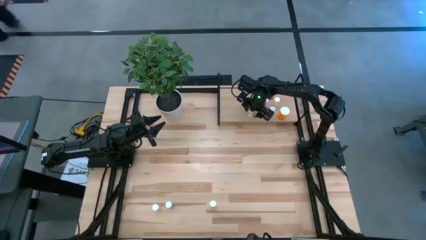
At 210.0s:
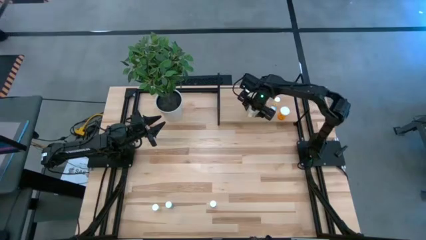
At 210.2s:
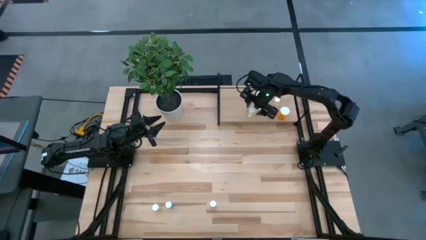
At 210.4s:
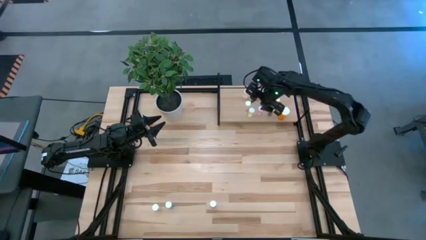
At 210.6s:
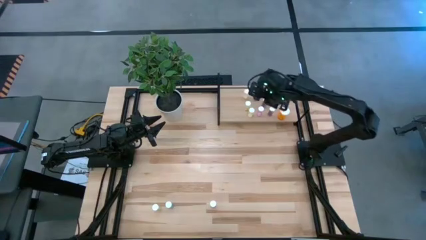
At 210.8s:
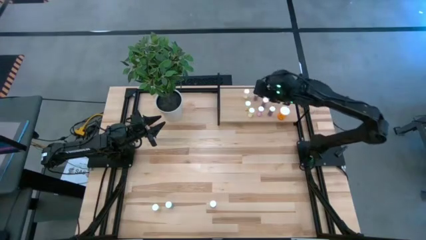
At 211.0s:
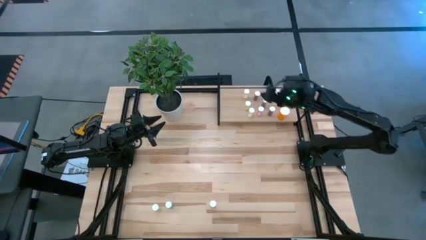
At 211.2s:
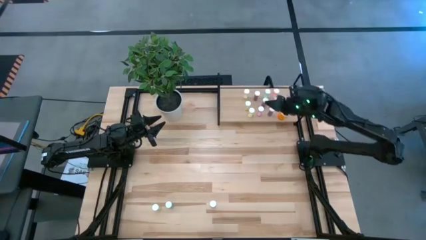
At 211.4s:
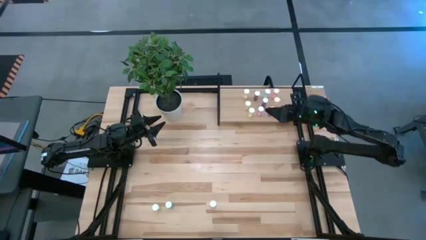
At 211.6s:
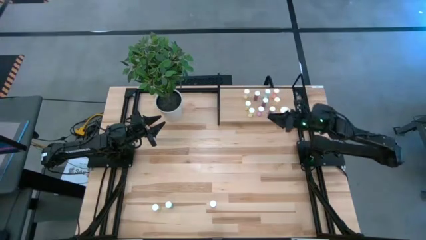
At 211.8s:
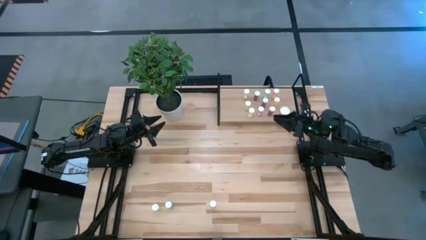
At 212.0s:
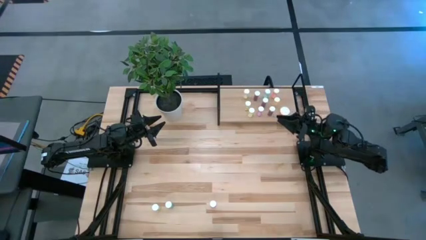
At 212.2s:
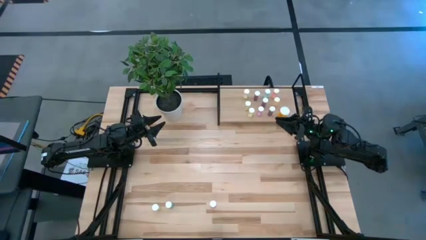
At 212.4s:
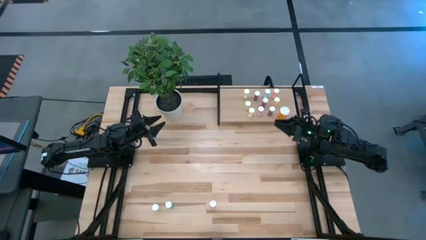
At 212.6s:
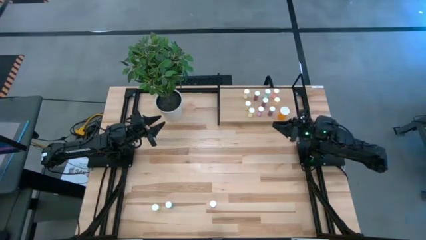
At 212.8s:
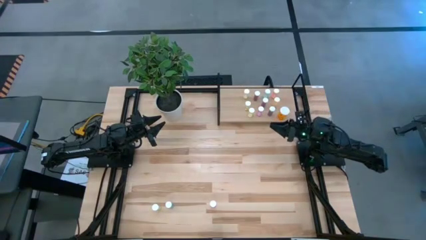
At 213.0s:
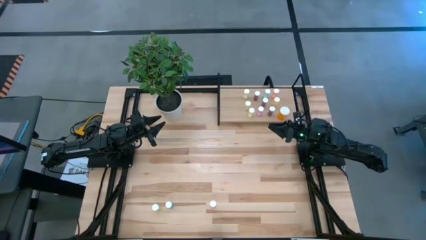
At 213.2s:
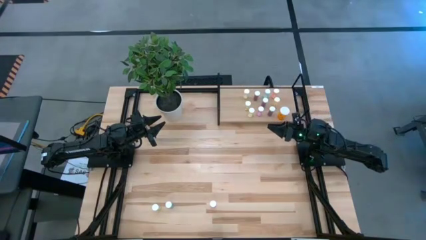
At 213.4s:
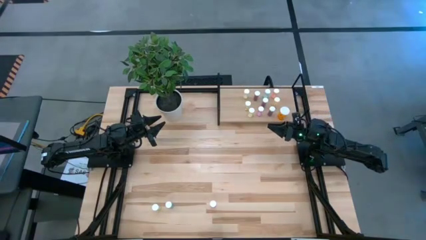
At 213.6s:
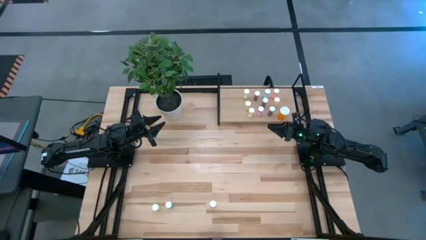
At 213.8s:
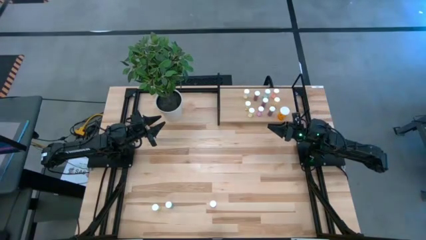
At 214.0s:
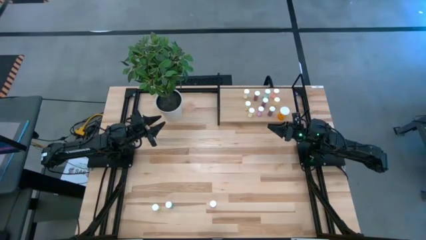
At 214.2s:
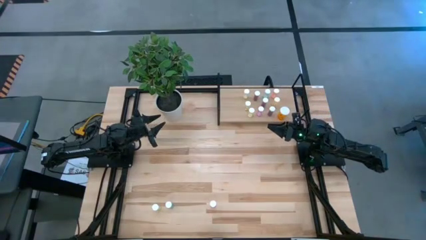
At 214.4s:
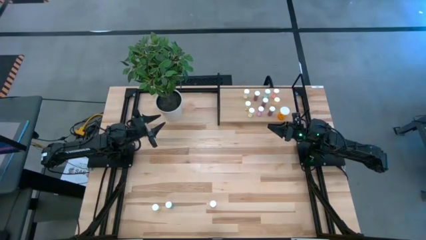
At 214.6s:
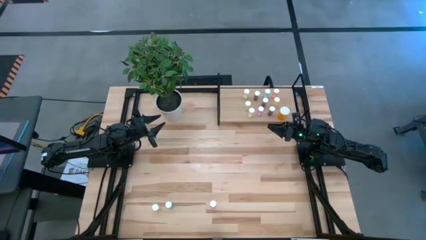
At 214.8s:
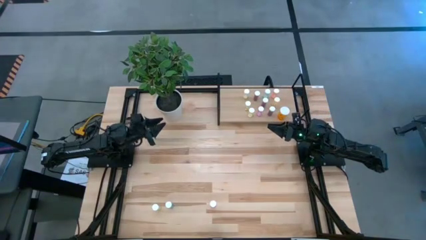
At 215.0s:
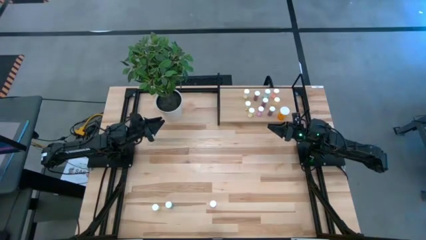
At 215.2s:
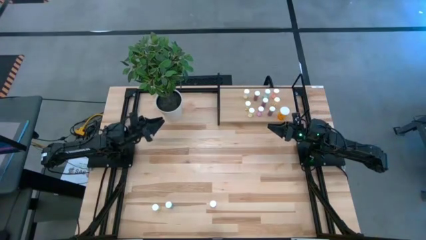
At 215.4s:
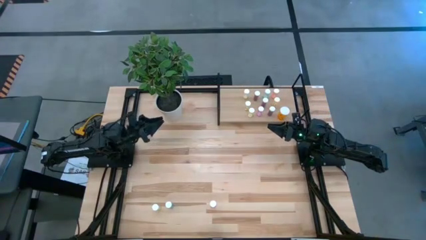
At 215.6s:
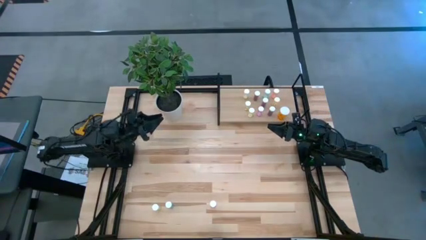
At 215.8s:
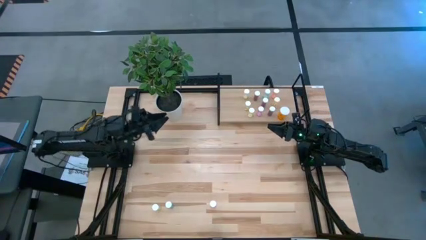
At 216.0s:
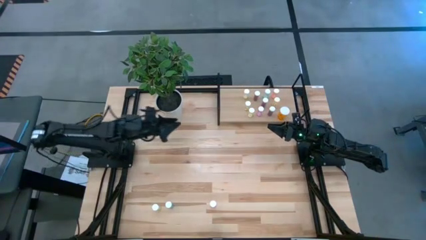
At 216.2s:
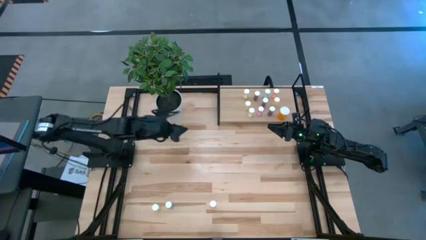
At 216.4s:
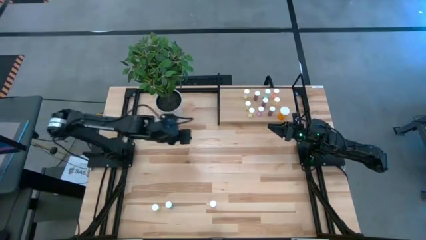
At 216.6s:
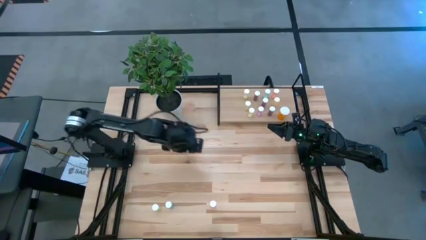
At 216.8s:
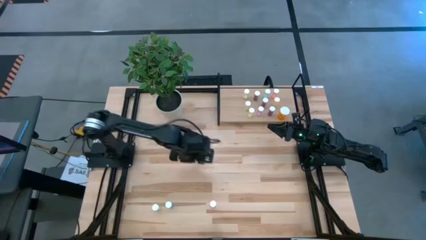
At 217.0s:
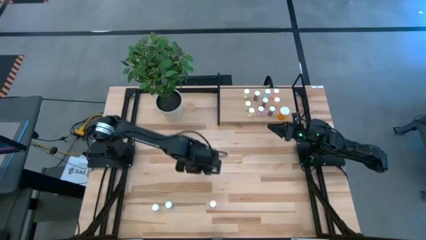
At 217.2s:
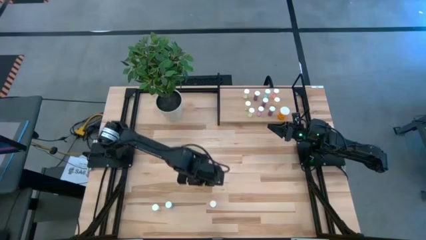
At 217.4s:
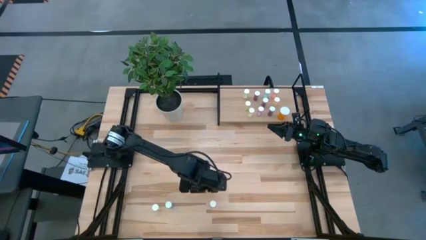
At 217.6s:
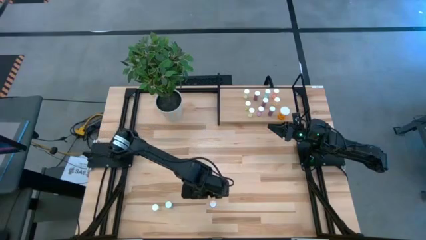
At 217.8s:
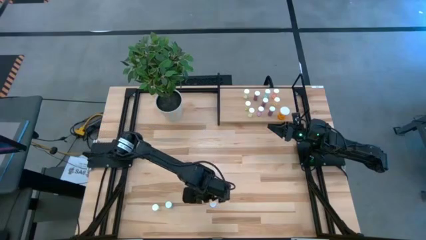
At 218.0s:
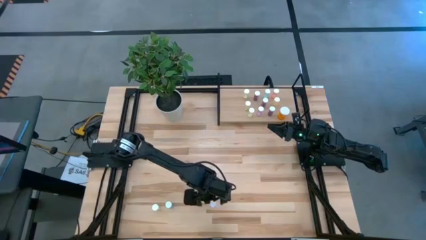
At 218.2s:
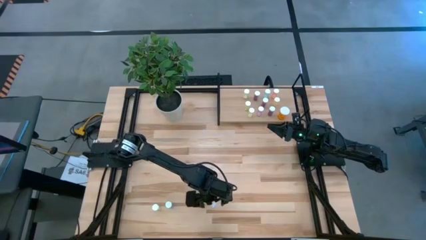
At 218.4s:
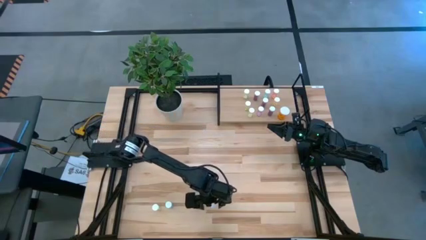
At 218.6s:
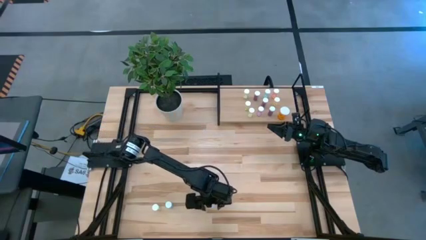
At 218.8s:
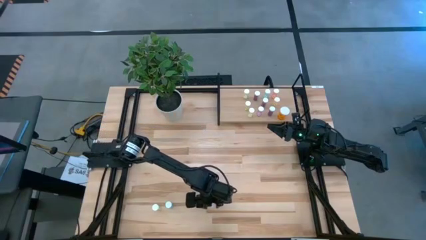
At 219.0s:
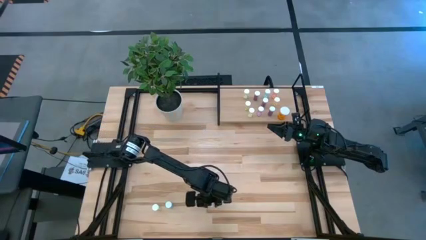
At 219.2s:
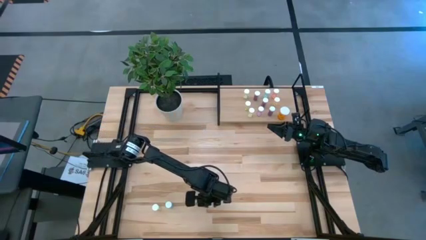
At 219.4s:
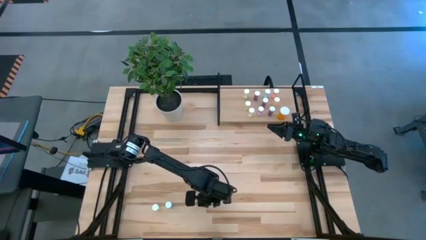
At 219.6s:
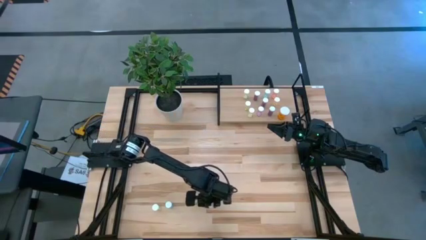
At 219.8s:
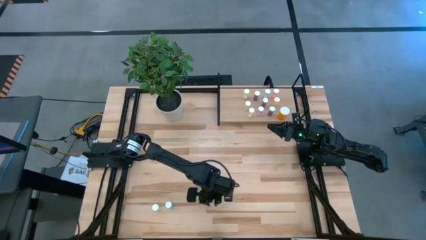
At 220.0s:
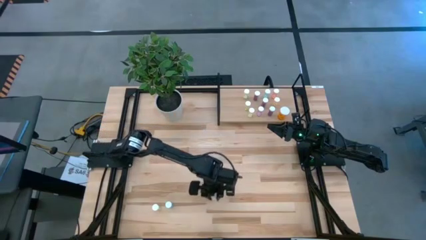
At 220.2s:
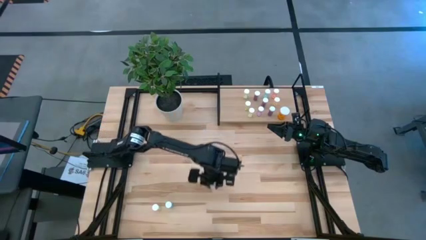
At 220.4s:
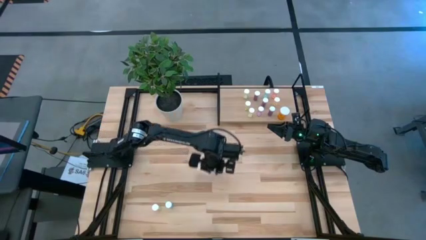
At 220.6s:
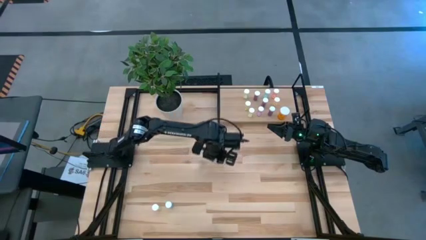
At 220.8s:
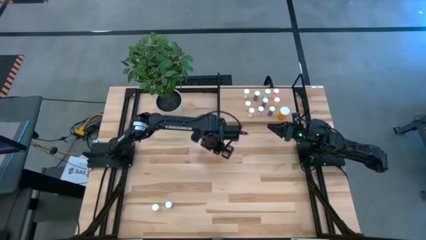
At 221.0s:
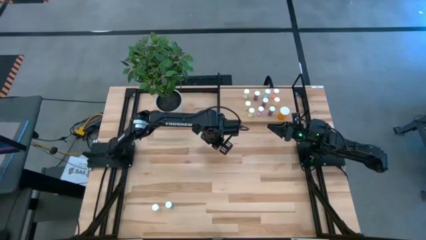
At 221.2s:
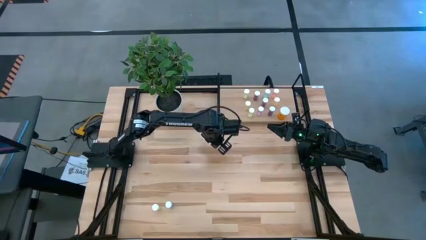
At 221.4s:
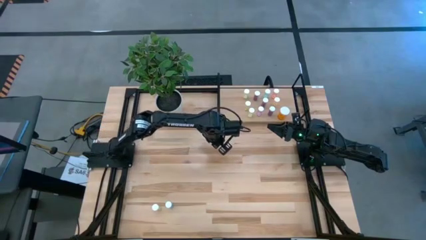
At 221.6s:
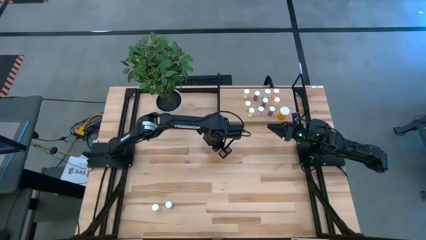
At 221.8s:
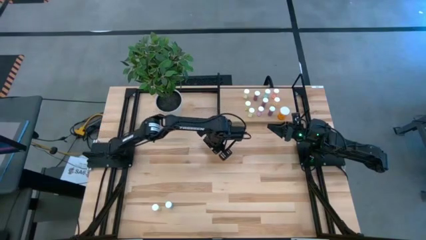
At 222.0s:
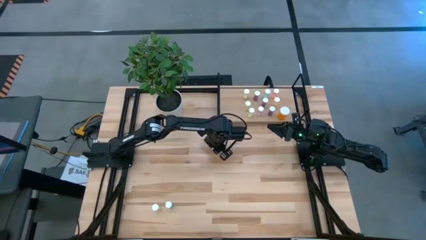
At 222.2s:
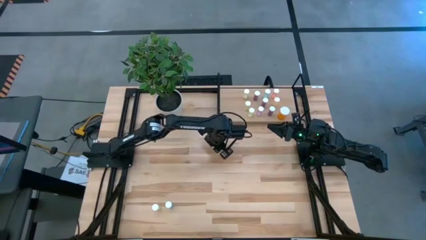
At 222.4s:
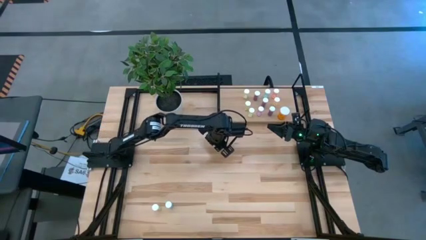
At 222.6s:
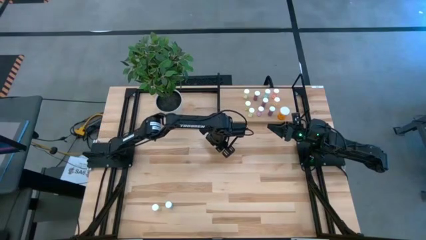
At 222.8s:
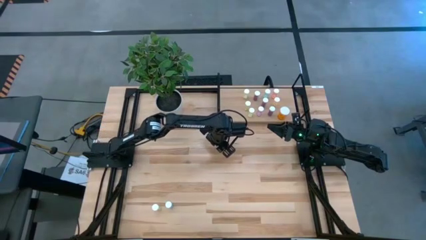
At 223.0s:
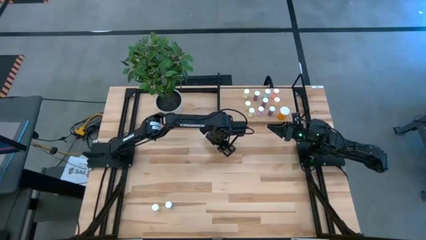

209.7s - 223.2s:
Task: Pick and place medicine bottles onto shelf by color
Move the pink pill bottle to the center of the table

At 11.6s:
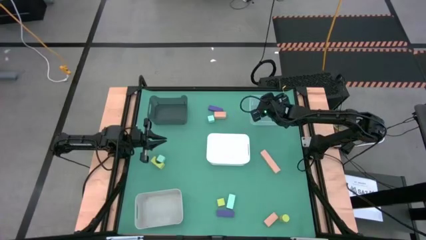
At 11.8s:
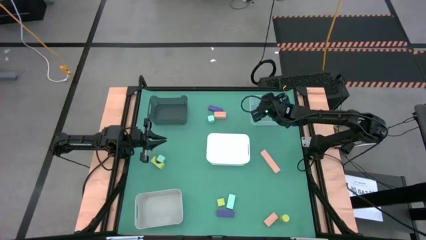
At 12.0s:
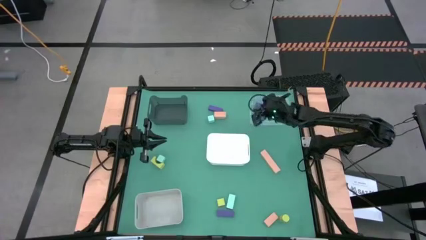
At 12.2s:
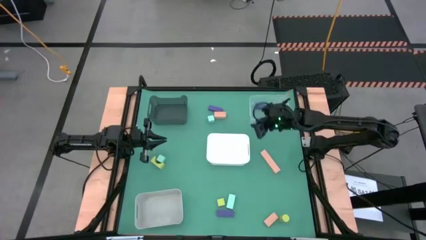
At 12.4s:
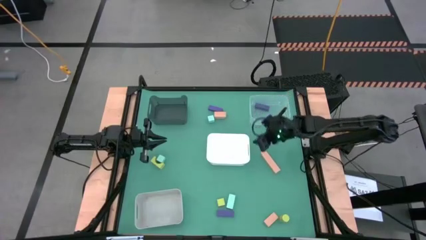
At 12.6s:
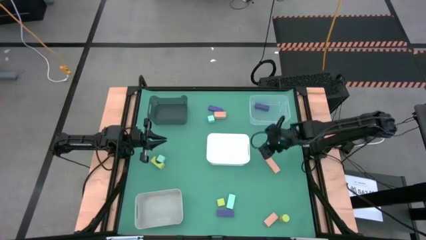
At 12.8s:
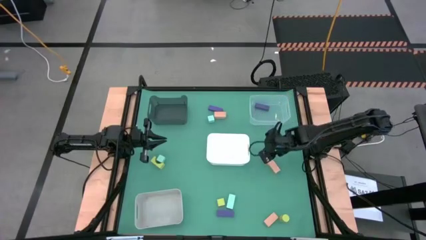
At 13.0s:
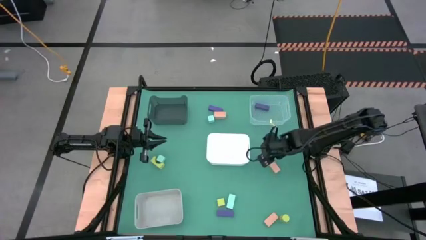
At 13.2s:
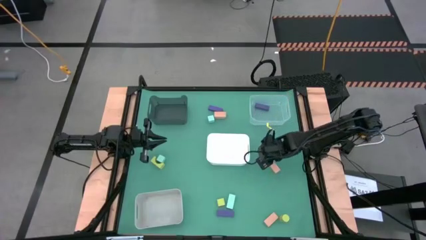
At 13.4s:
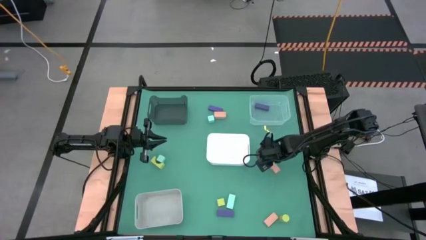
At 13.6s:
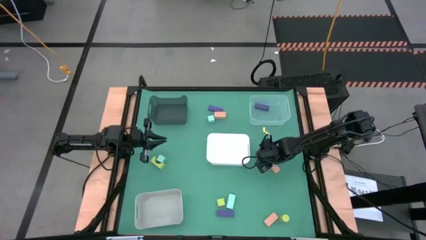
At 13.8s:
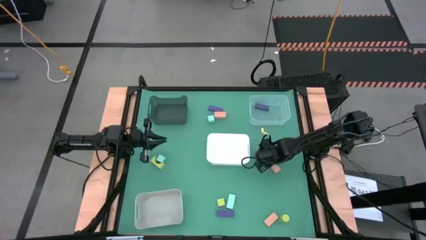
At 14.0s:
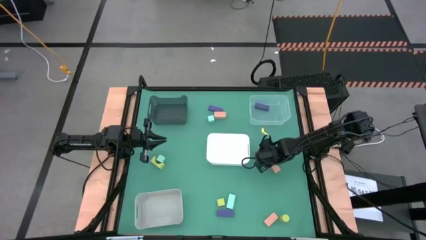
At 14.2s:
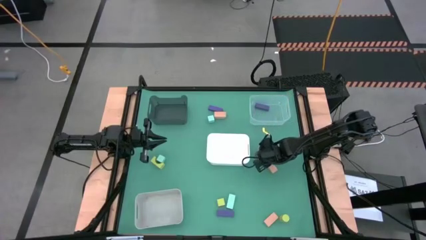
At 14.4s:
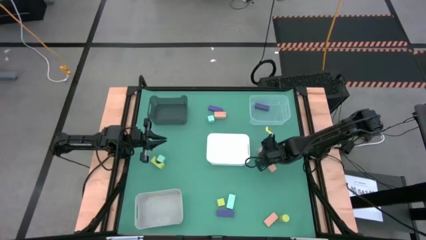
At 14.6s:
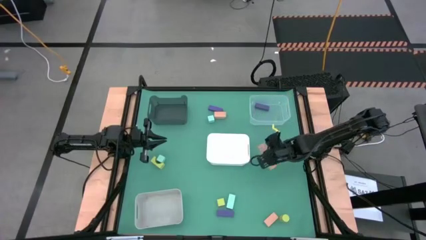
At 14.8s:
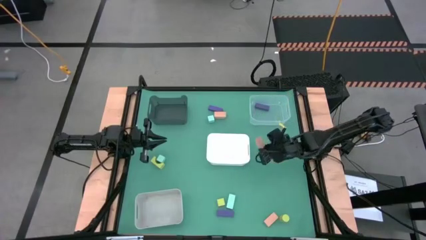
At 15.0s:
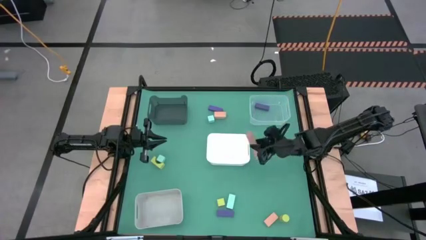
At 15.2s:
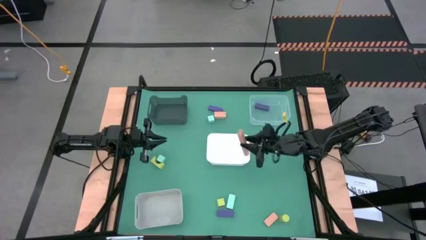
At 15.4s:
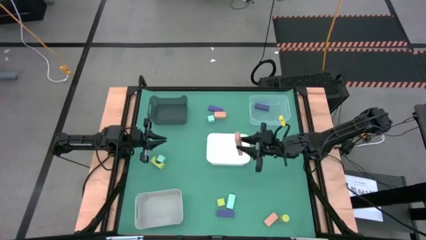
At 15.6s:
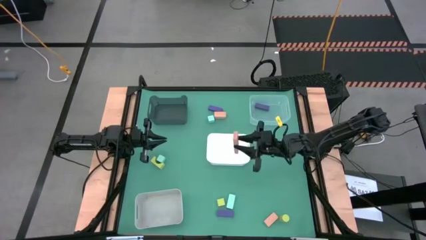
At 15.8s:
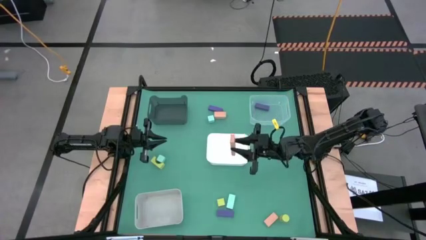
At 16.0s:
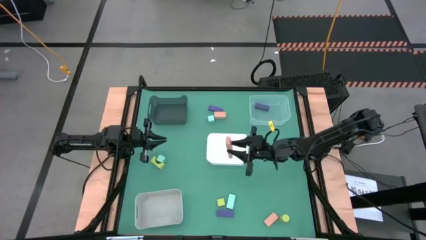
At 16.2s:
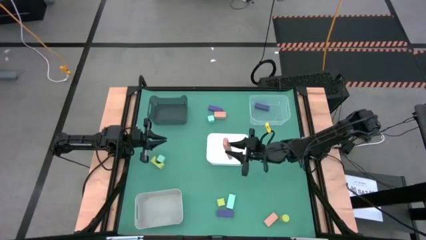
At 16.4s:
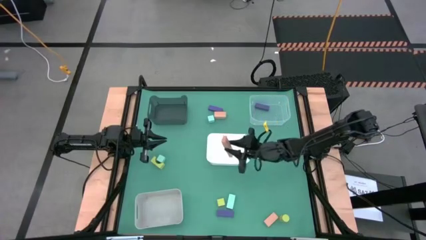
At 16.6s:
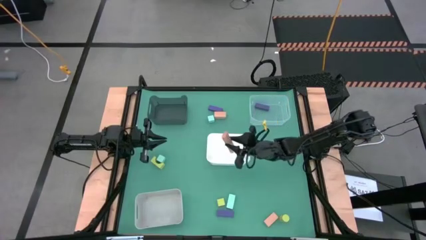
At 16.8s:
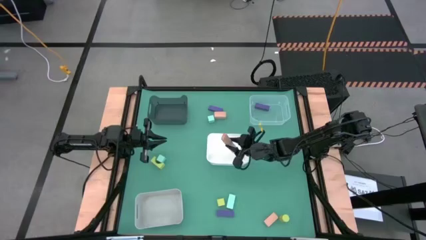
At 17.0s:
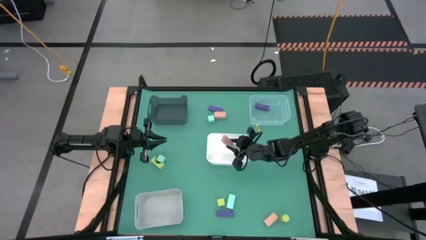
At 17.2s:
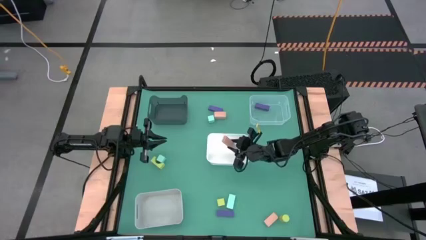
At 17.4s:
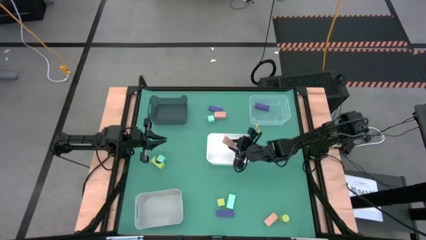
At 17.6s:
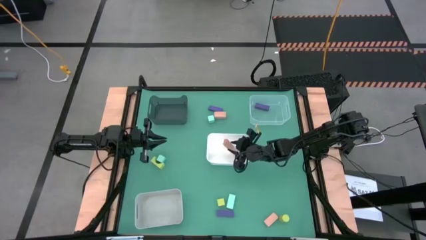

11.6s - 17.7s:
Task: Sort & place blocks by color
Put the middle right orange block into the white bin
